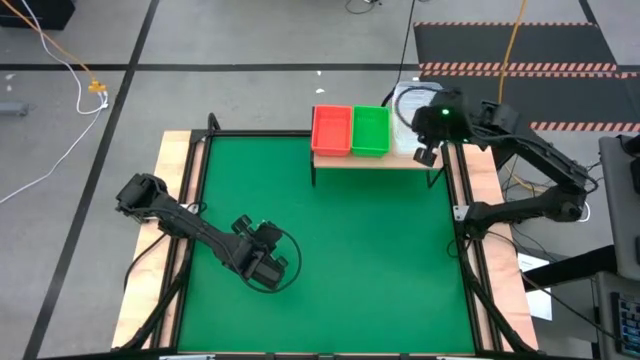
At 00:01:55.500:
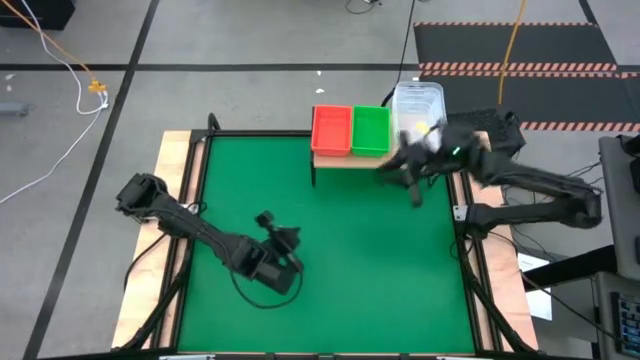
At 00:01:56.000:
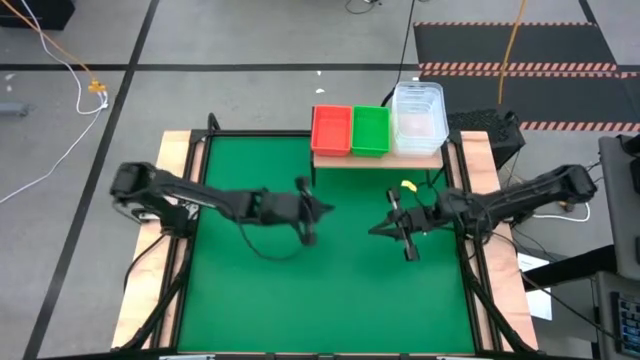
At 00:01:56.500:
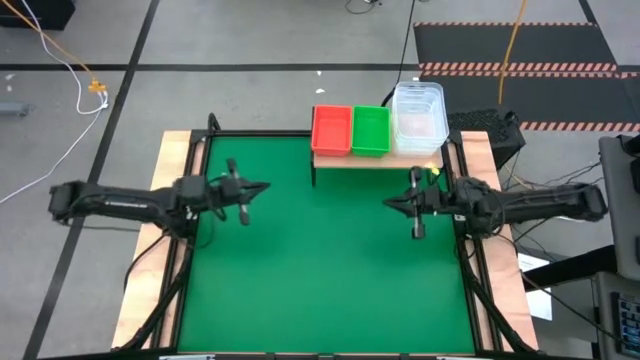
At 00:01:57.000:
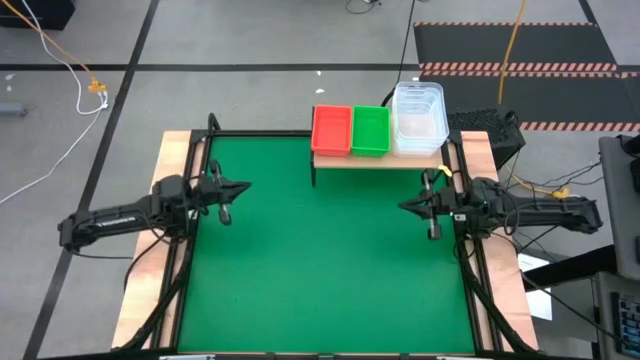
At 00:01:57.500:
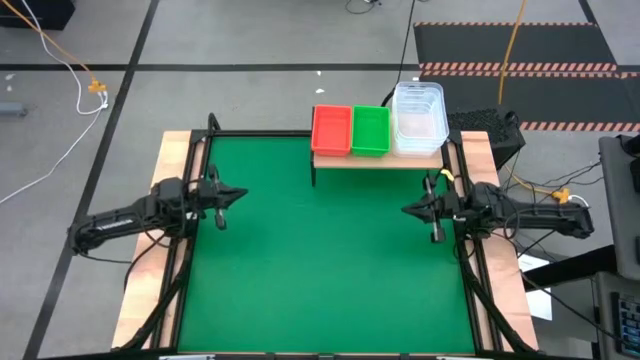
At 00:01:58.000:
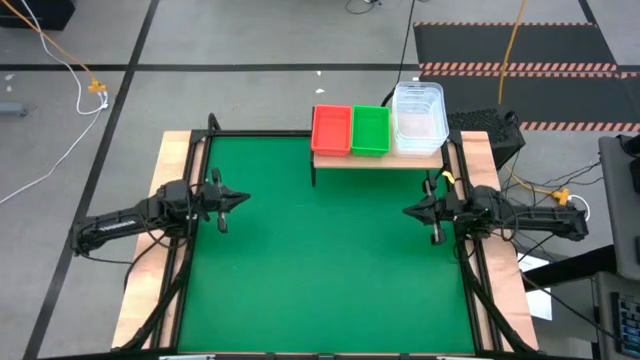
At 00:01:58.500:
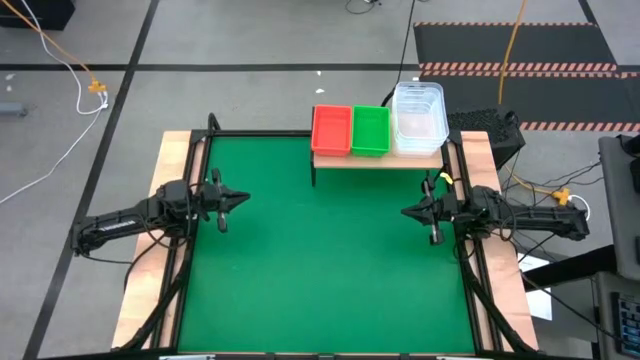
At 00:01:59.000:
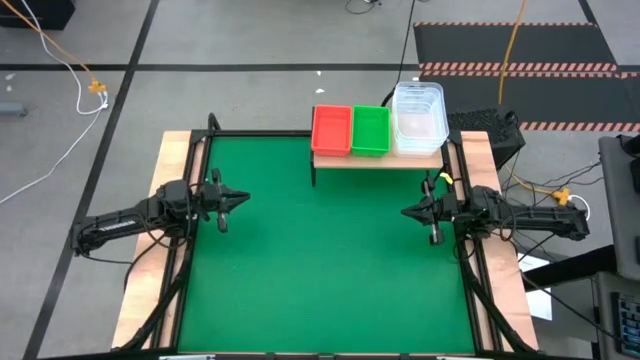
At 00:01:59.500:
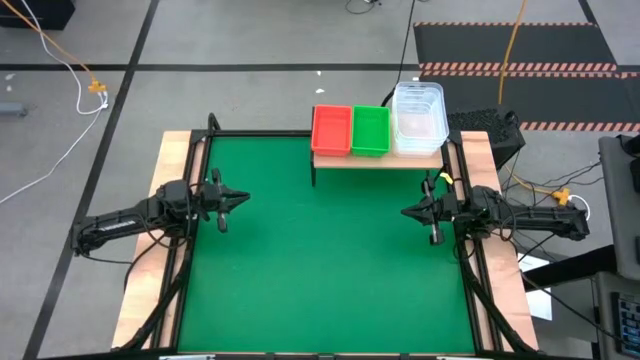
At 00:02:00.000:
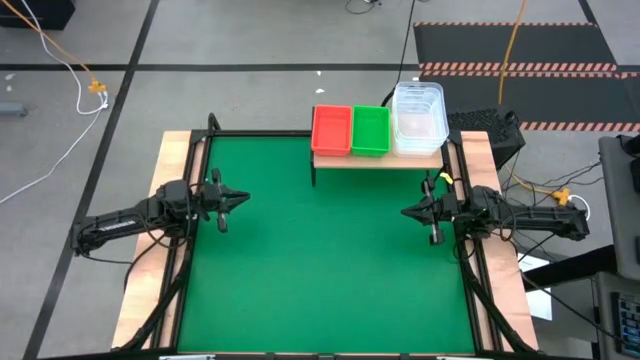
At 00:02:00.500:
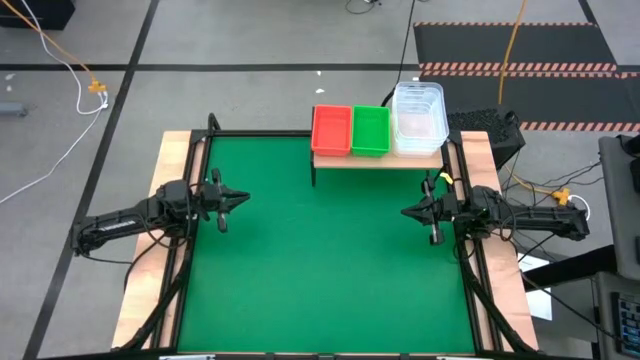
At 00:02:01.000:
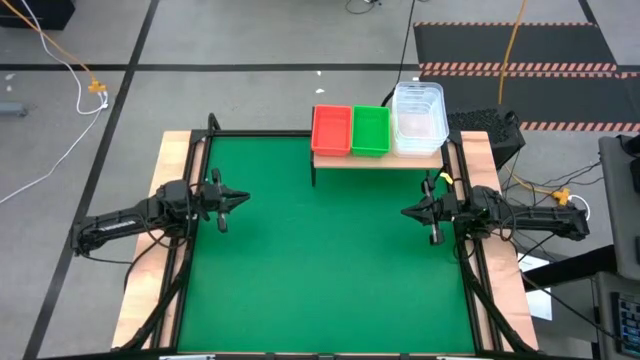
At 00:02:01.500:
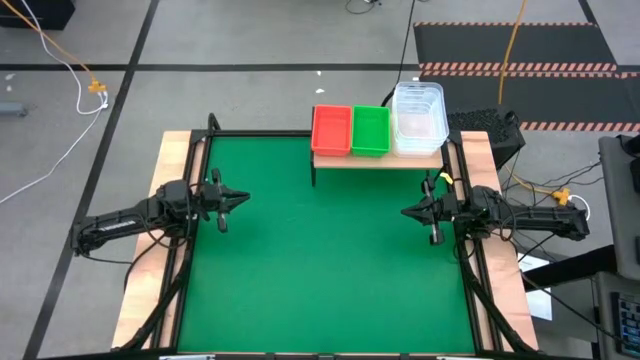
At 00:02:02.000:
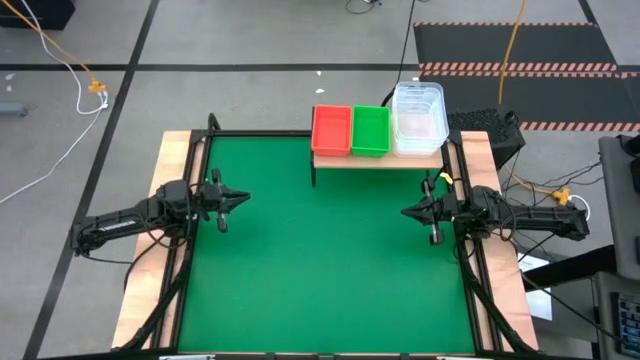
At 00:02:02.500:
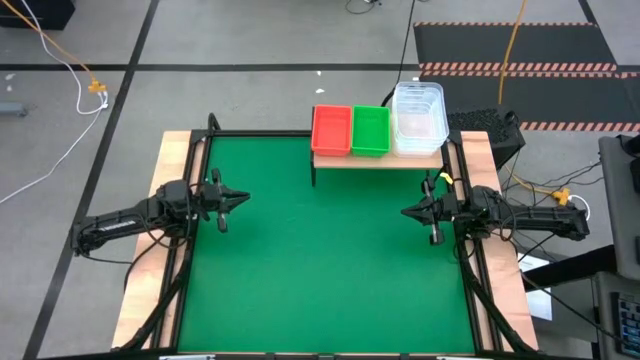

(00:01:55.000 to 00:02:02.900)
Task: Stack baskets on shelf by color
Return to Home Position

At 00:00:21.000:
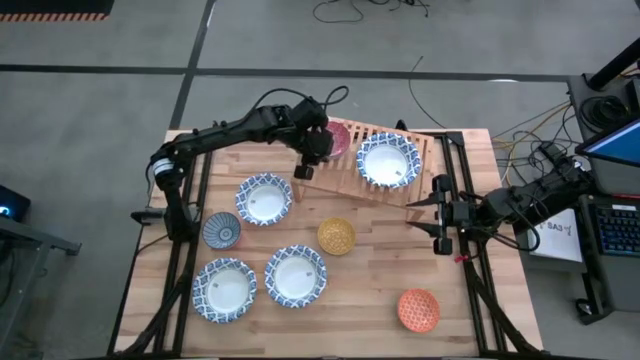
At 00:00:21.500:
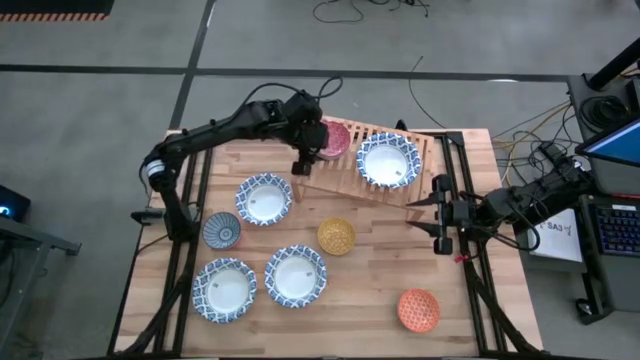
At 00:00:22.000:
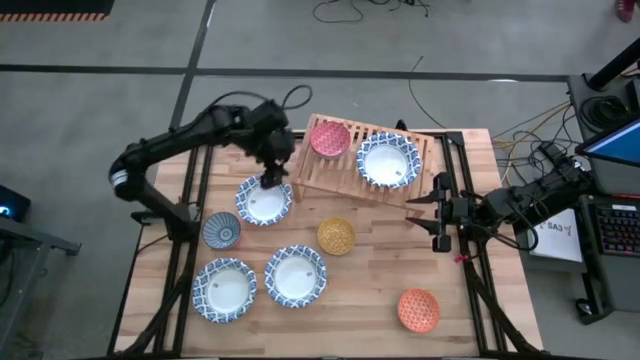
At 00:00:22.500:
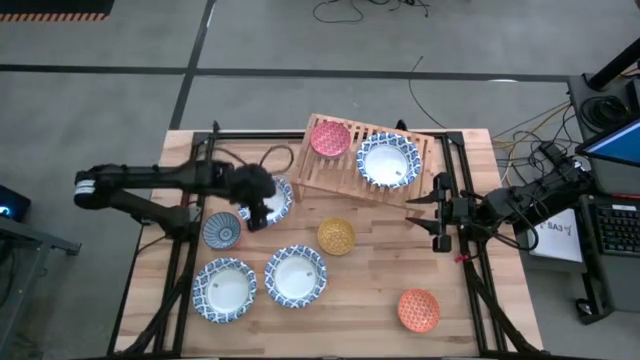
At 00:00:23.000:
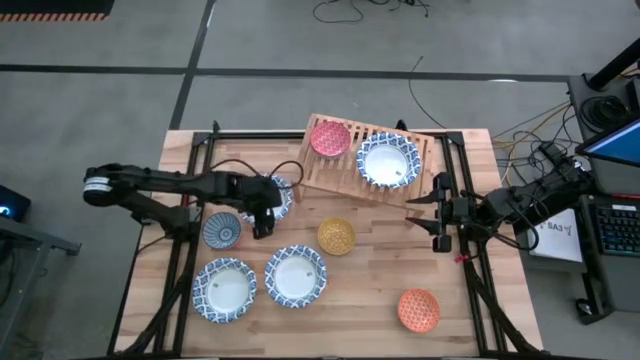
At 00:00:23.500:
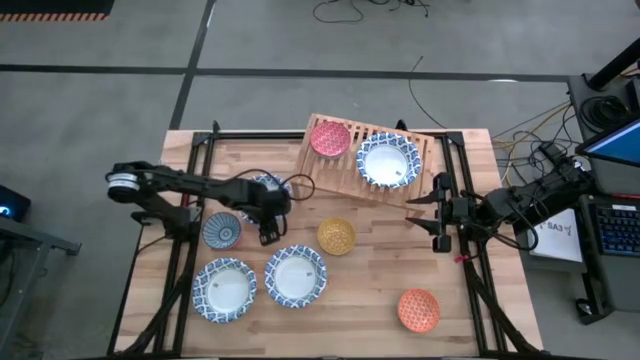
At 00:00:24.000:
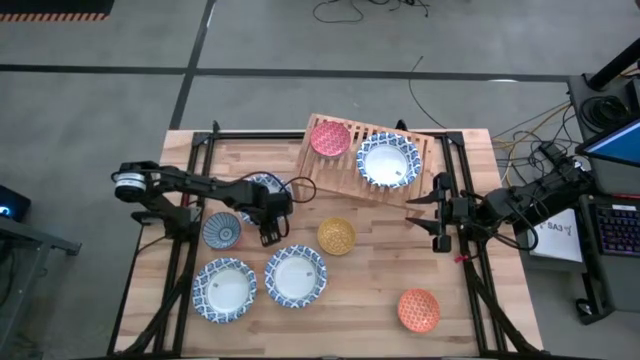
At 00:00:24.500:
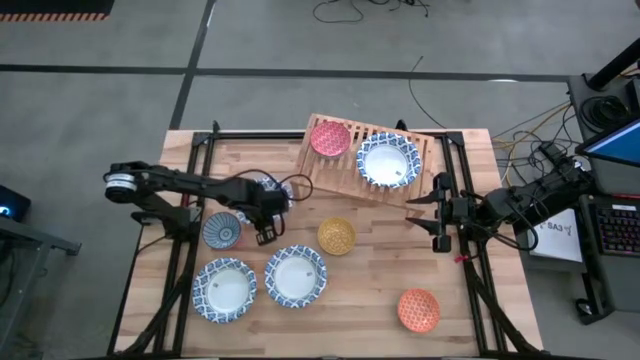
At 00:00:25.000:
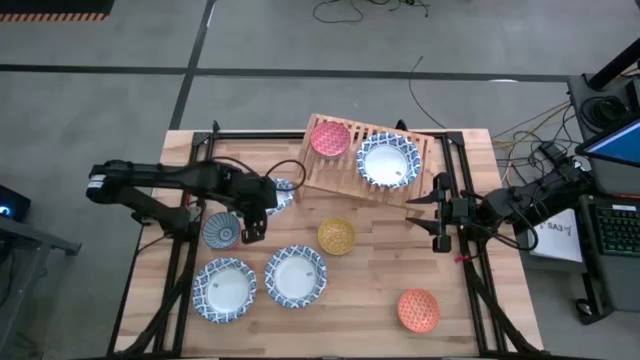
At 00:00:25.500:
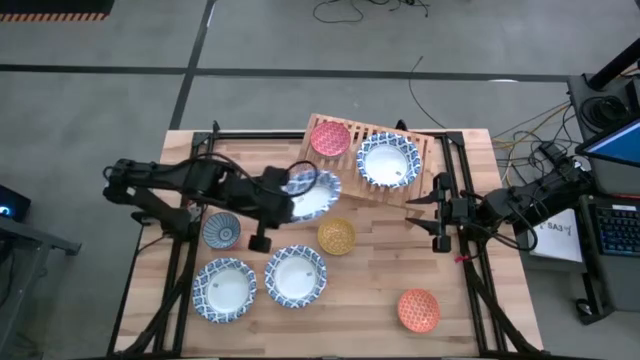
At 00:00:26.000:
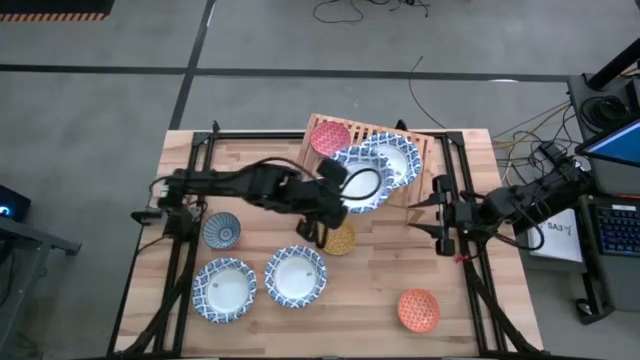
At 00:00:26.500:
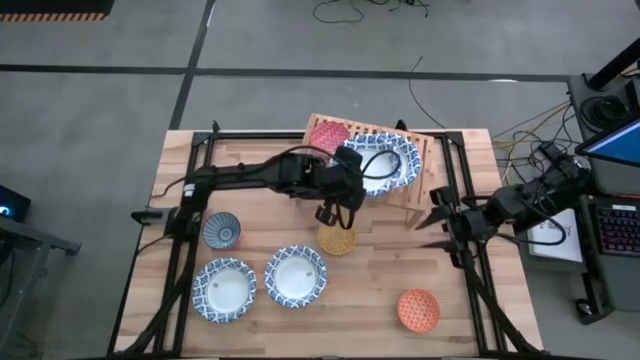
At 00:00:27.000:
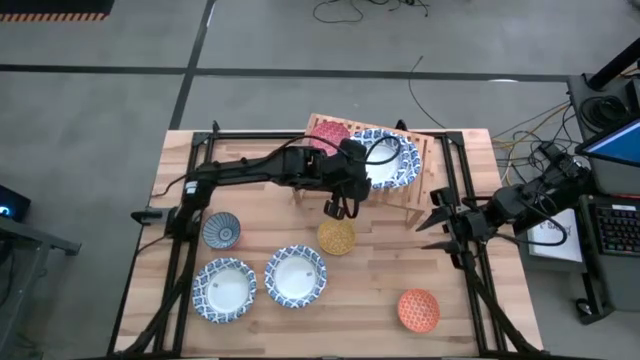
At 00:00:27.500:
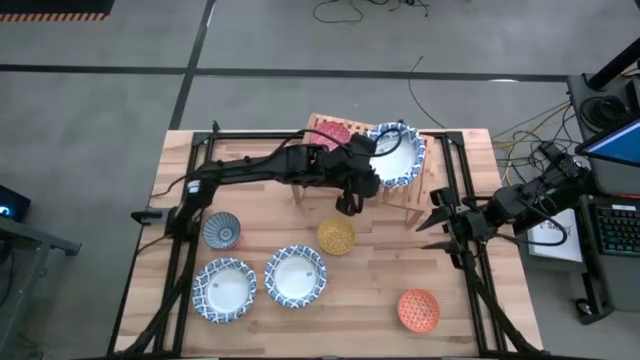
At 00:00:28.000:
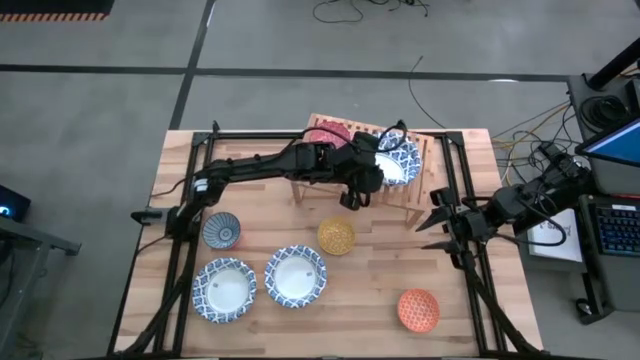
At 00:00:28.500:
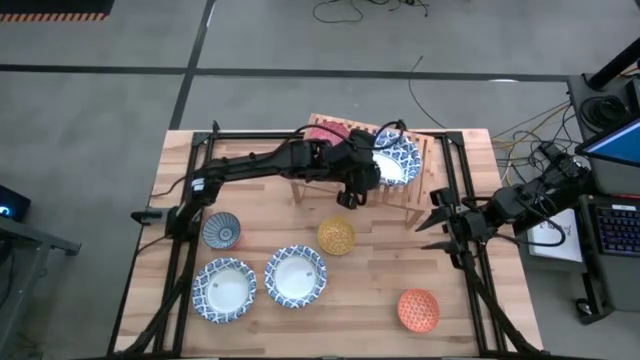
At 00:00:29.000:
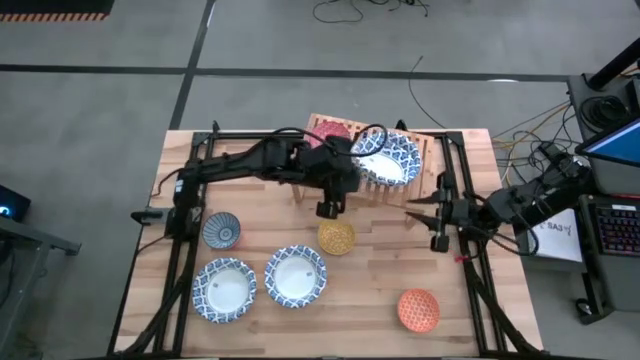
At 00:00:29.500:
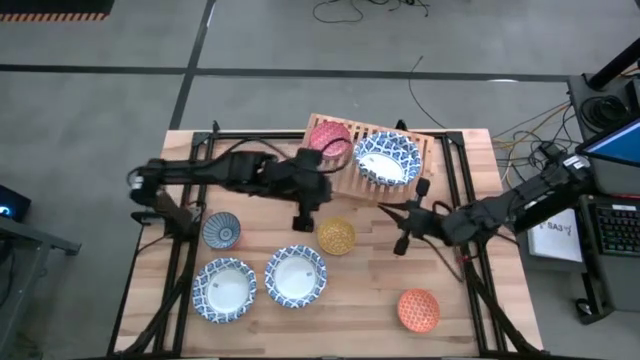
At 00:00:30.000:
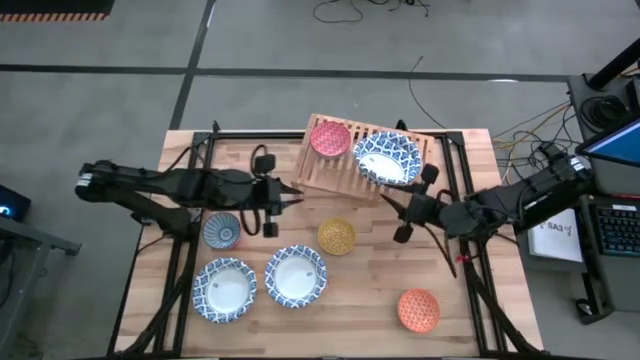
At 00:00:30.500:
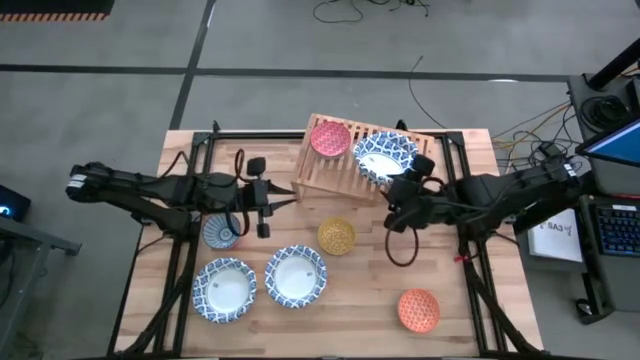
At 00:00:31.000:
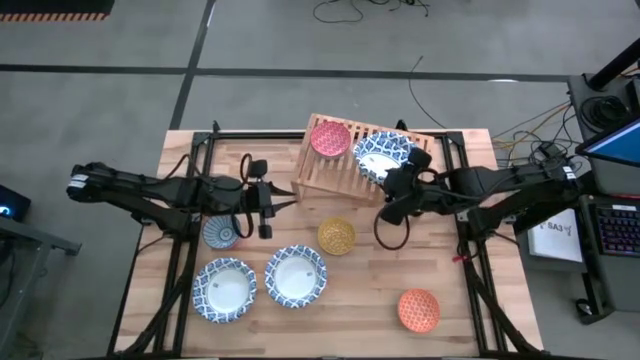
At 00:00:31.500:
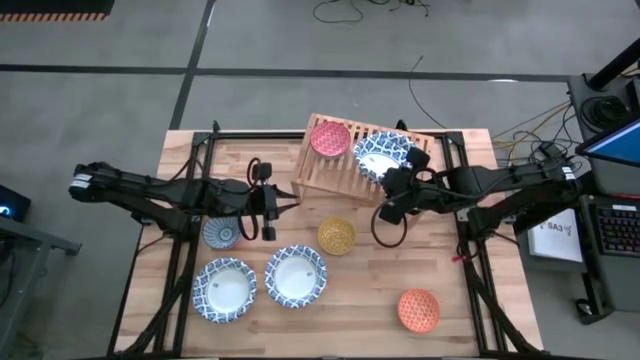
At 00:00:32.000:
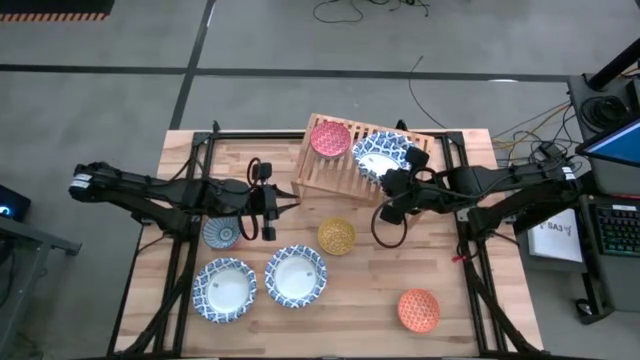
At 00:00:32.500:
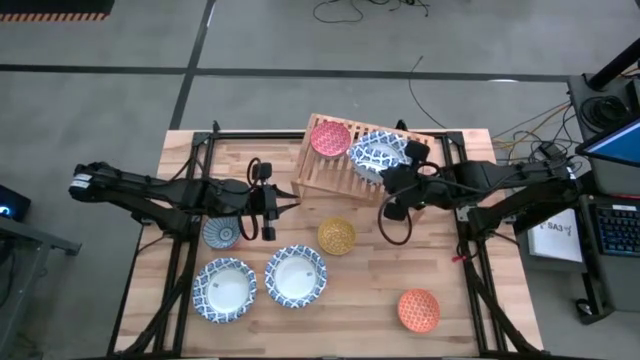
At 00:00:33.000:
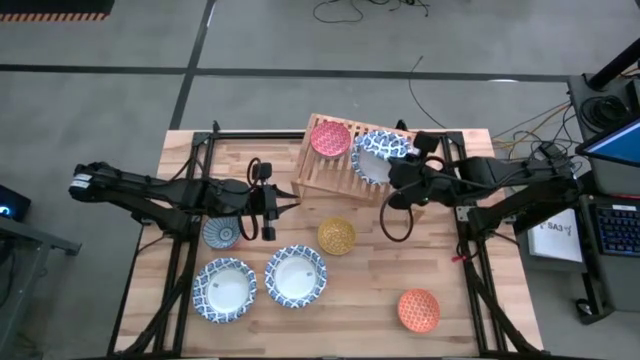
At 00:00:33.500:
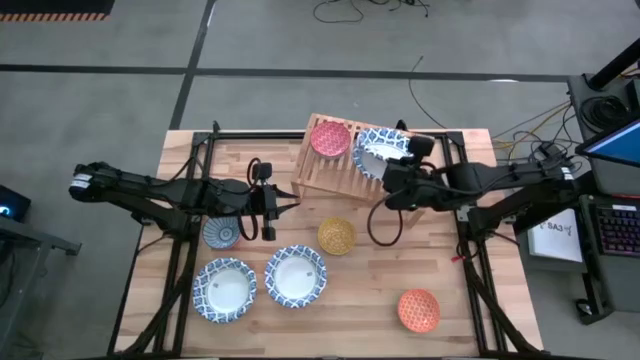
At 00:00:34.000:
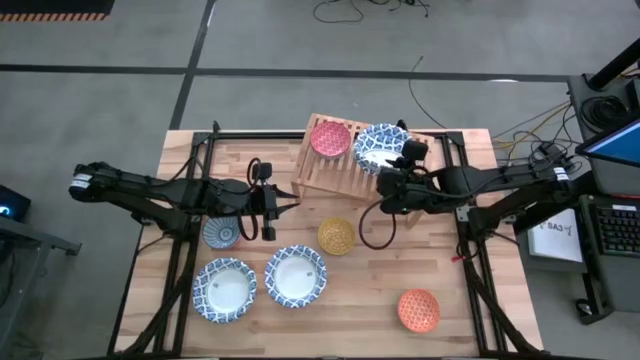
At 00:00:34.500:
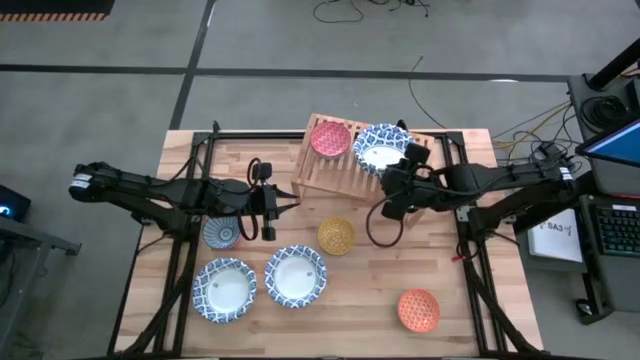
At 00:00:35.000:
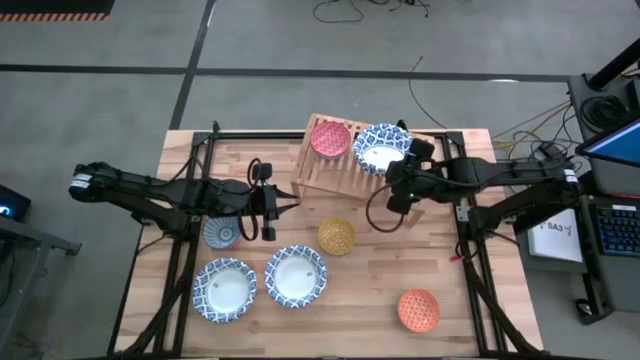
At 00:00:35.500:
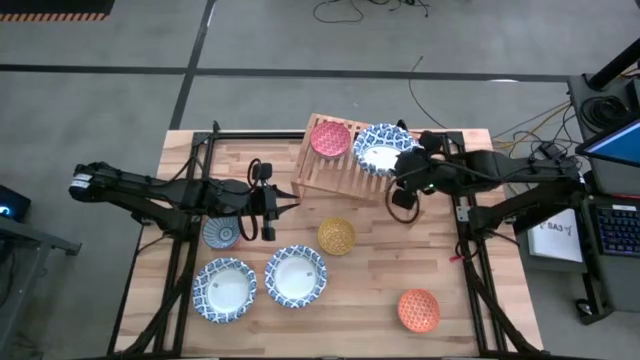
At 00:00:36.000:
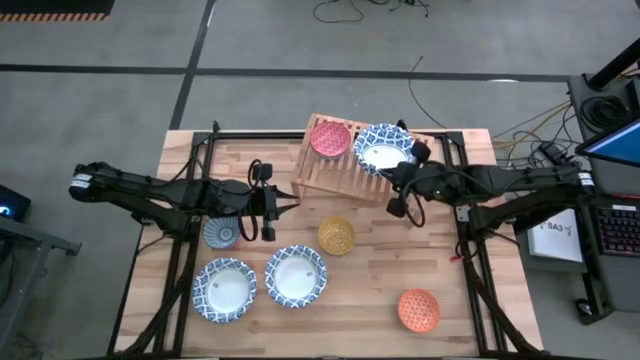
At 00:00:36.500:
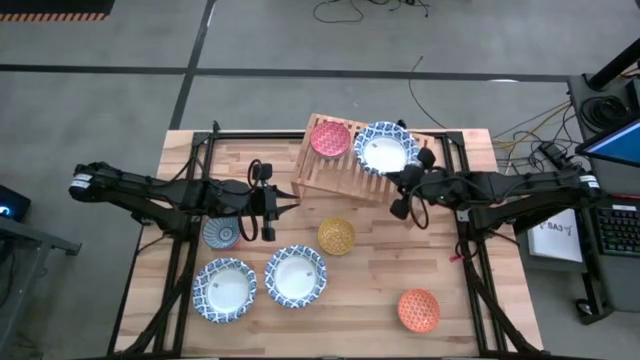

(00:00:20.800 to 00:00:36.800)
Task: Place and stack bowls onto a shelf
Stack the white pattern bowl on top of the other white pattern bowl on the shelf
